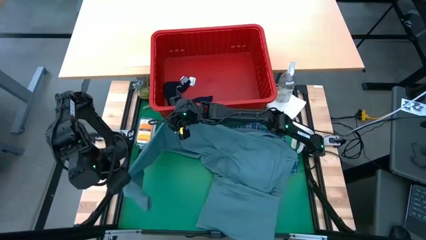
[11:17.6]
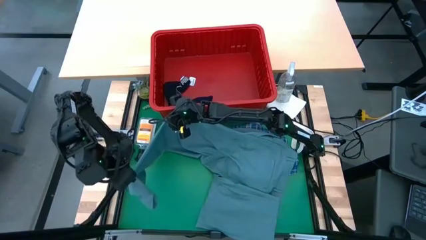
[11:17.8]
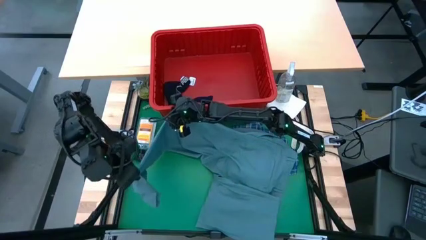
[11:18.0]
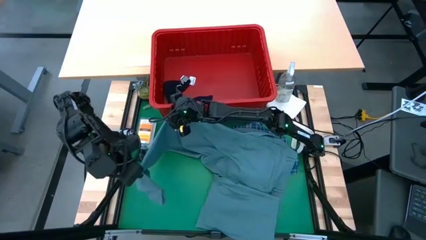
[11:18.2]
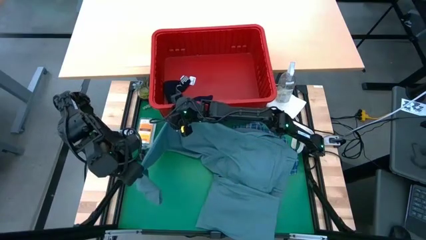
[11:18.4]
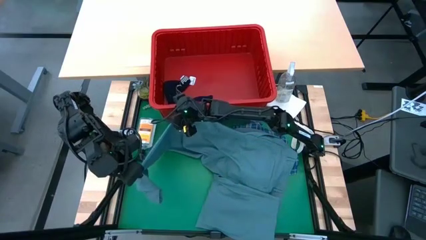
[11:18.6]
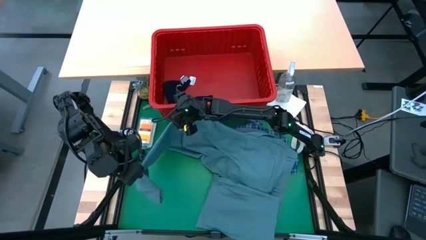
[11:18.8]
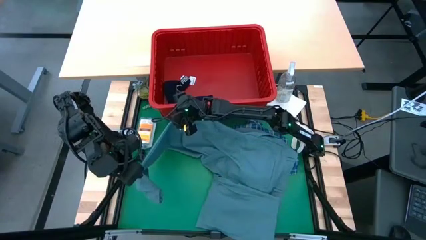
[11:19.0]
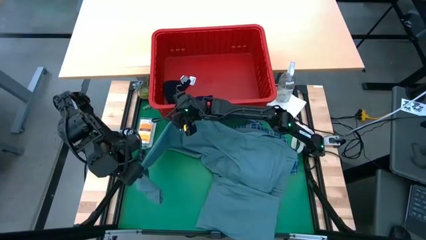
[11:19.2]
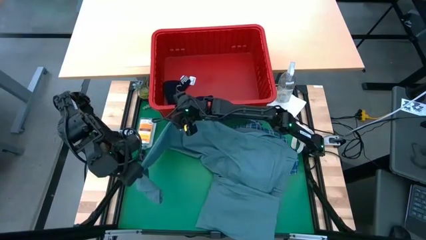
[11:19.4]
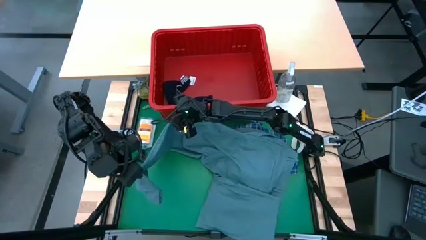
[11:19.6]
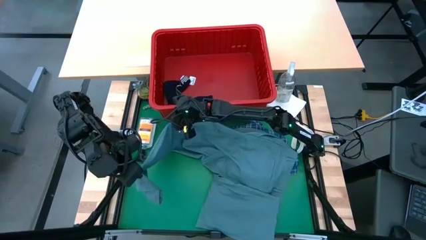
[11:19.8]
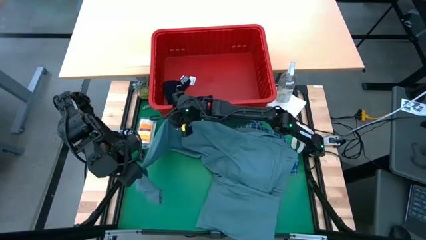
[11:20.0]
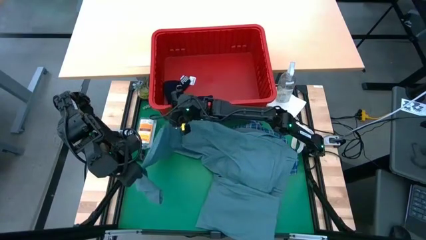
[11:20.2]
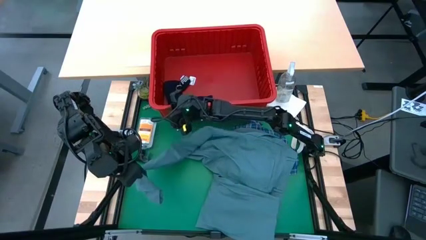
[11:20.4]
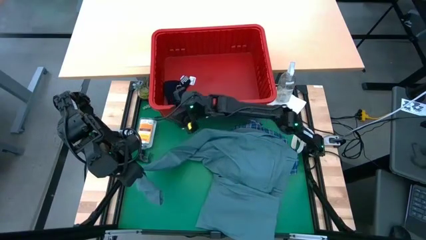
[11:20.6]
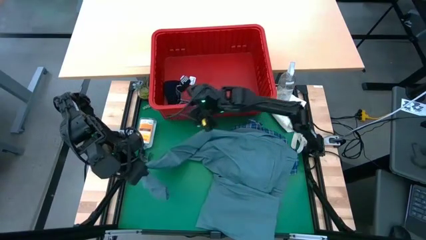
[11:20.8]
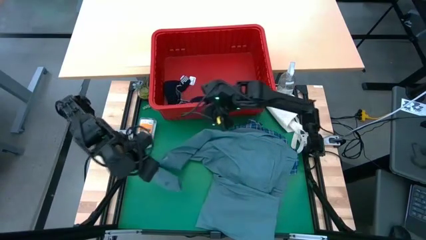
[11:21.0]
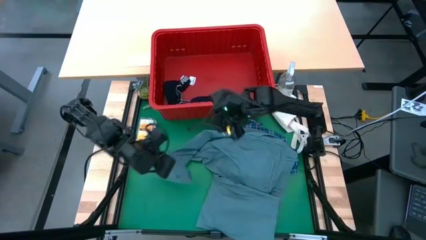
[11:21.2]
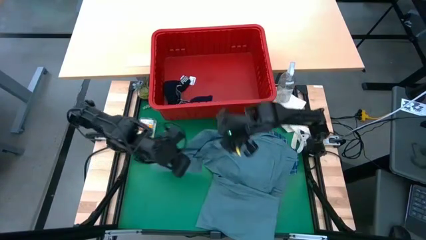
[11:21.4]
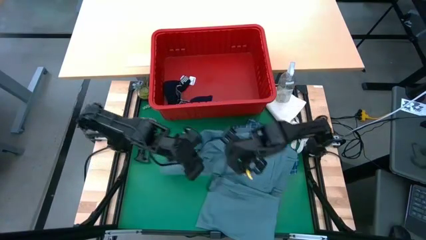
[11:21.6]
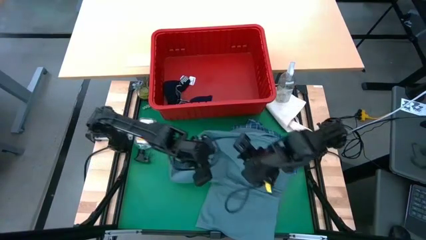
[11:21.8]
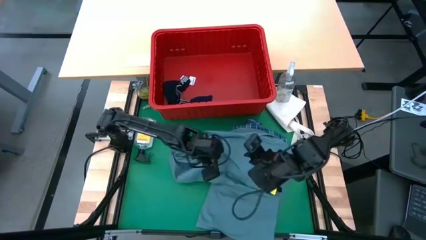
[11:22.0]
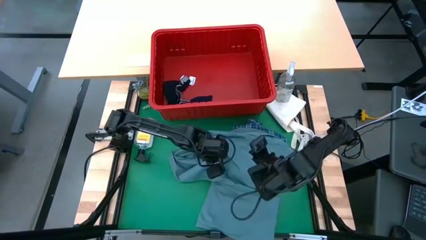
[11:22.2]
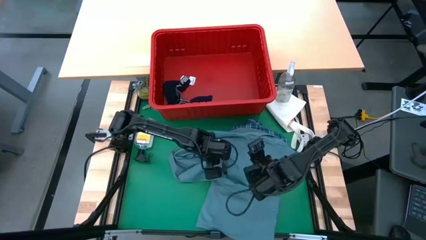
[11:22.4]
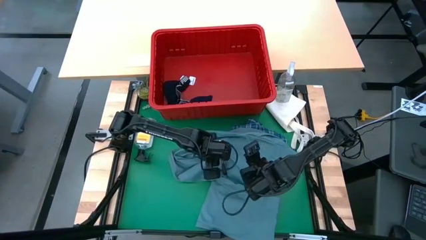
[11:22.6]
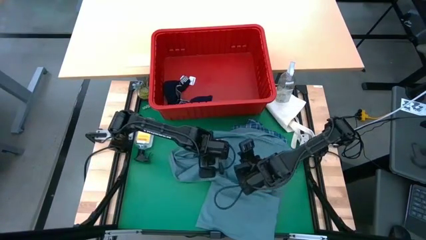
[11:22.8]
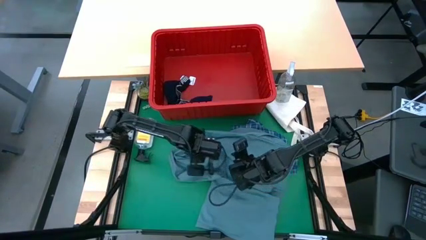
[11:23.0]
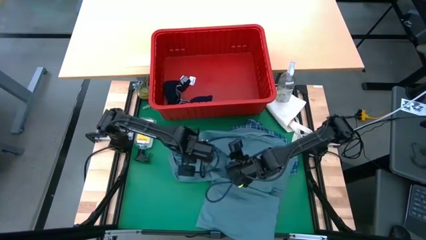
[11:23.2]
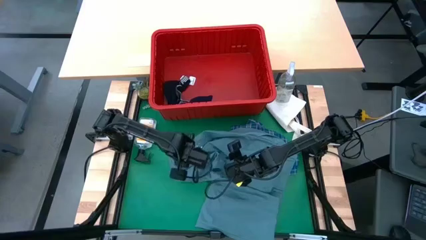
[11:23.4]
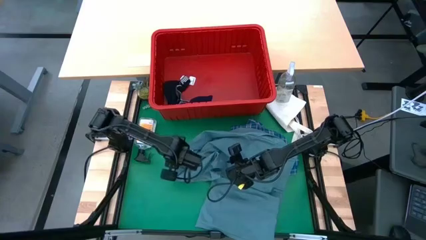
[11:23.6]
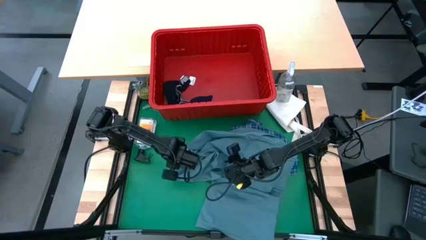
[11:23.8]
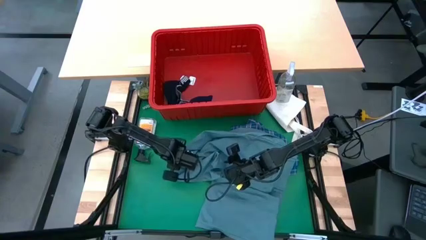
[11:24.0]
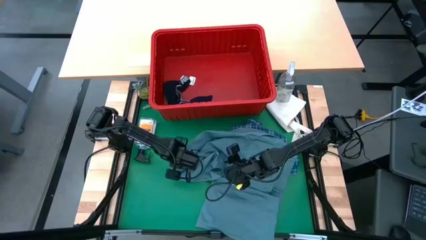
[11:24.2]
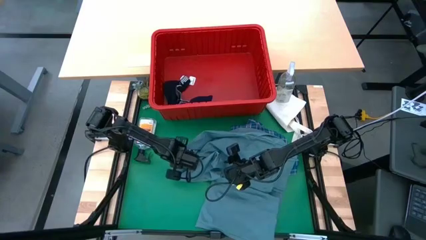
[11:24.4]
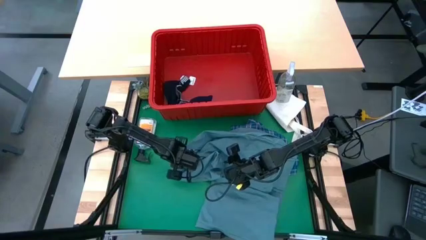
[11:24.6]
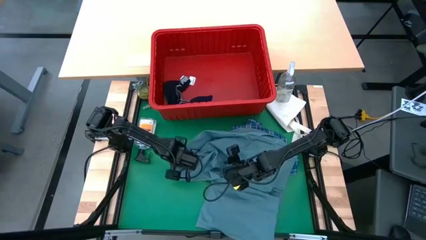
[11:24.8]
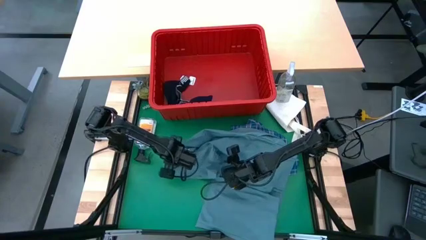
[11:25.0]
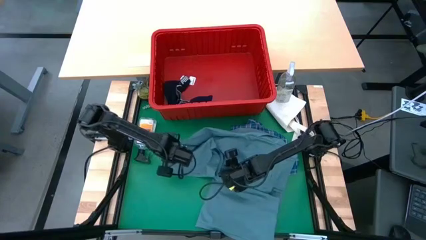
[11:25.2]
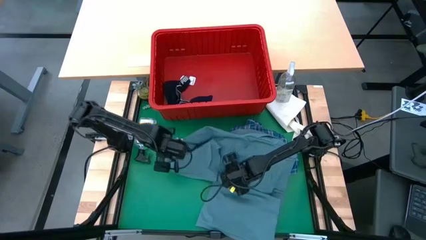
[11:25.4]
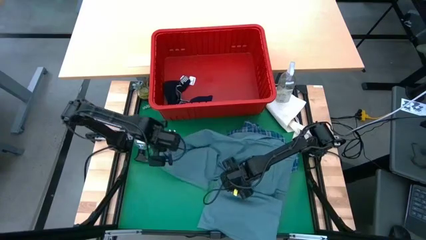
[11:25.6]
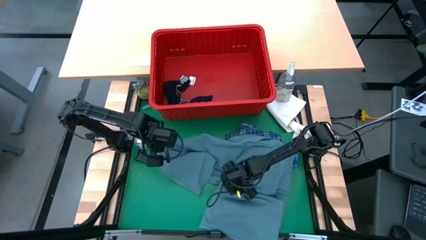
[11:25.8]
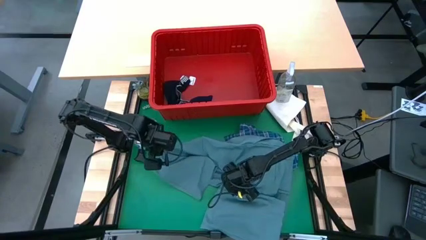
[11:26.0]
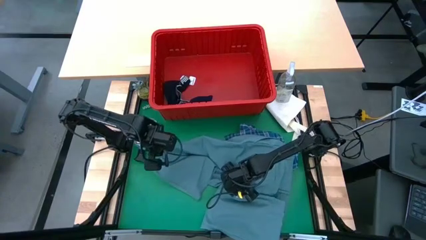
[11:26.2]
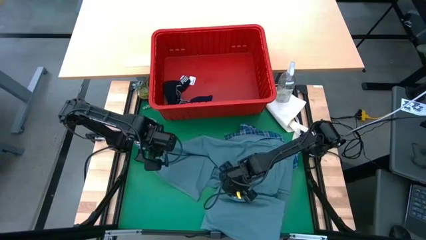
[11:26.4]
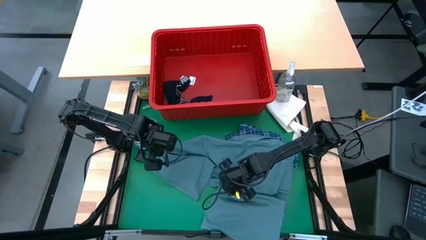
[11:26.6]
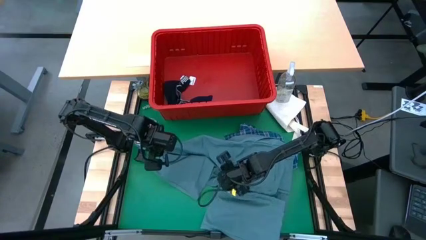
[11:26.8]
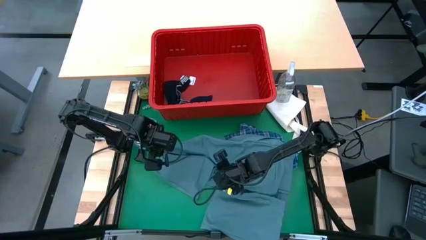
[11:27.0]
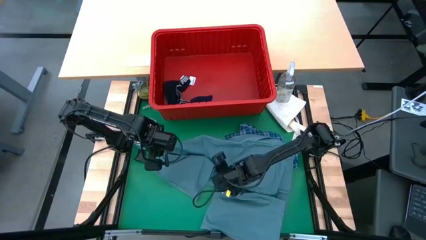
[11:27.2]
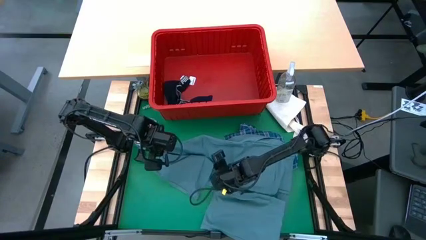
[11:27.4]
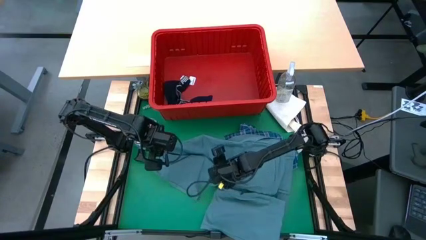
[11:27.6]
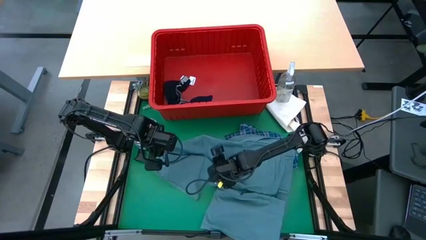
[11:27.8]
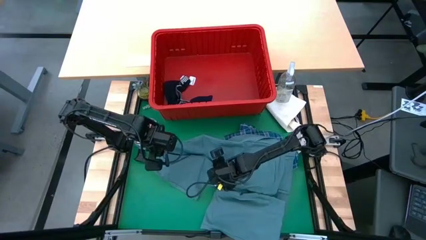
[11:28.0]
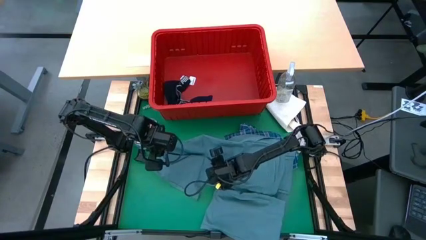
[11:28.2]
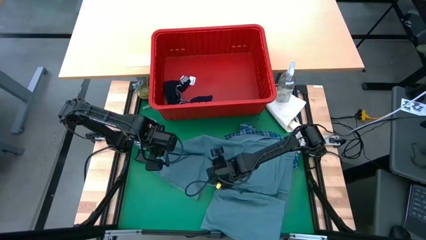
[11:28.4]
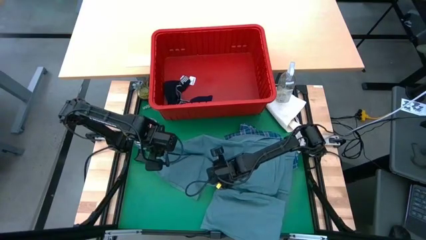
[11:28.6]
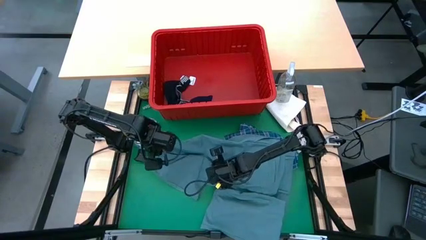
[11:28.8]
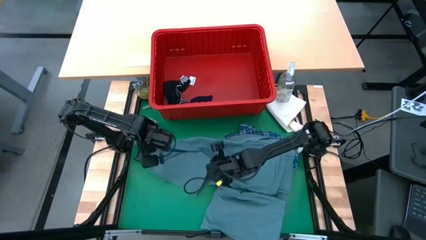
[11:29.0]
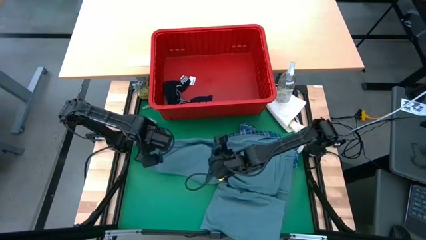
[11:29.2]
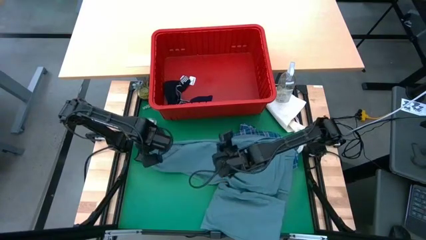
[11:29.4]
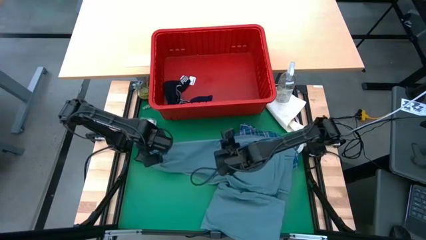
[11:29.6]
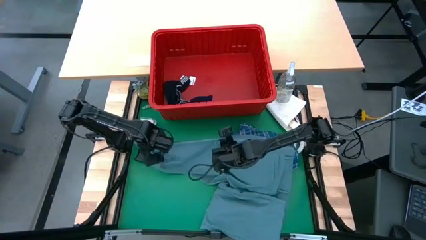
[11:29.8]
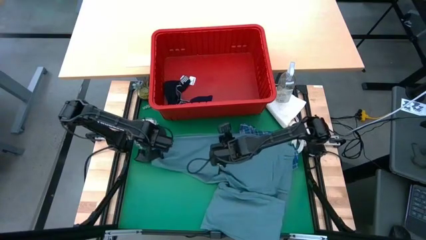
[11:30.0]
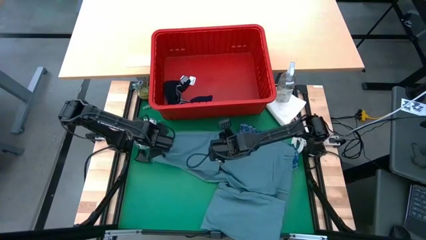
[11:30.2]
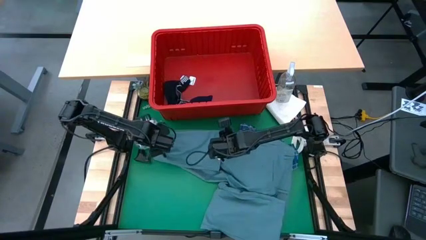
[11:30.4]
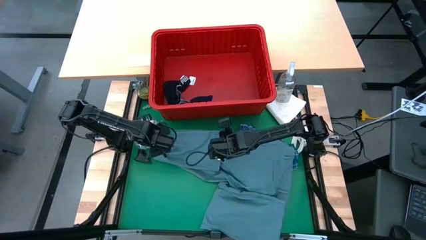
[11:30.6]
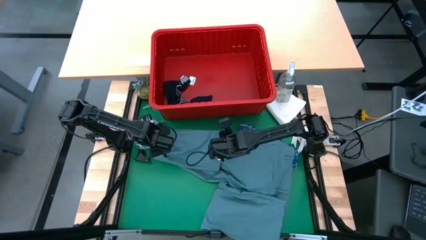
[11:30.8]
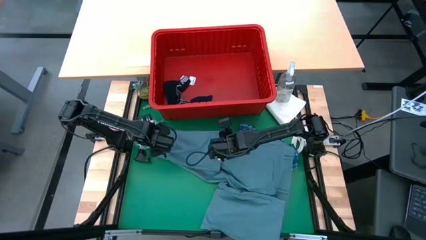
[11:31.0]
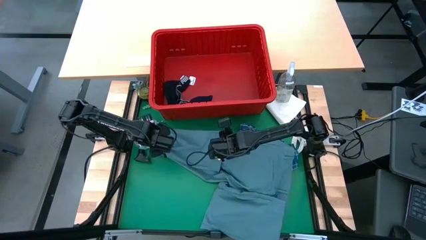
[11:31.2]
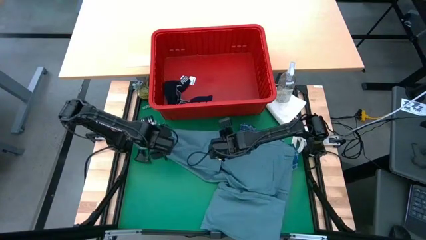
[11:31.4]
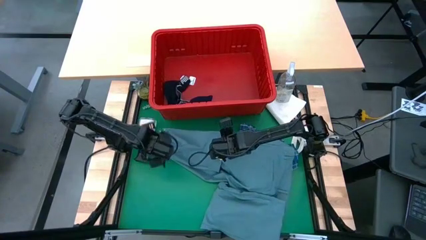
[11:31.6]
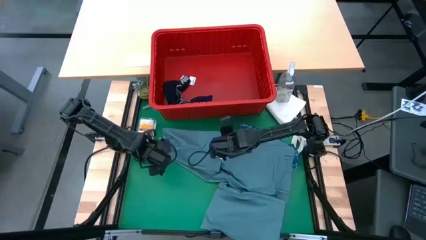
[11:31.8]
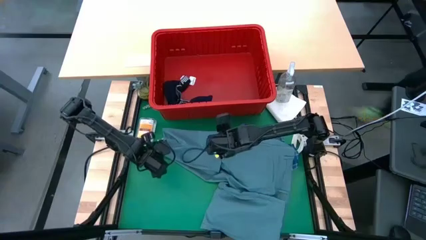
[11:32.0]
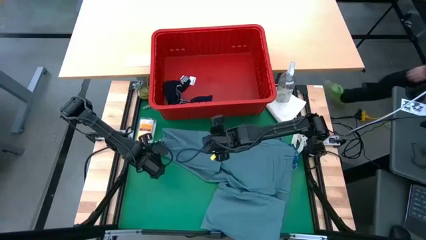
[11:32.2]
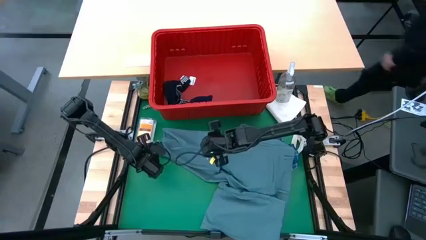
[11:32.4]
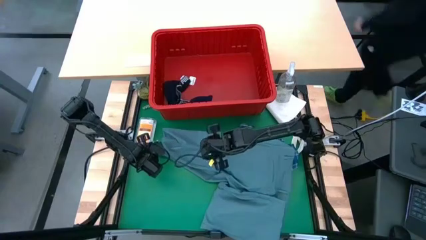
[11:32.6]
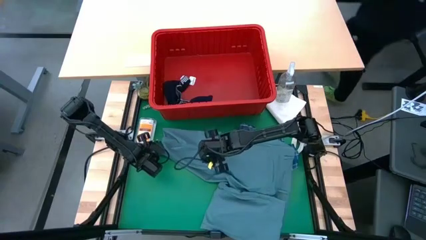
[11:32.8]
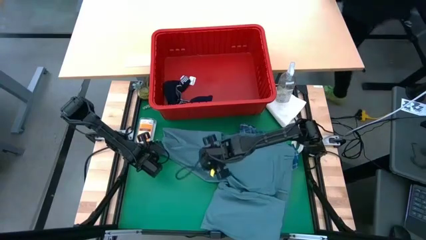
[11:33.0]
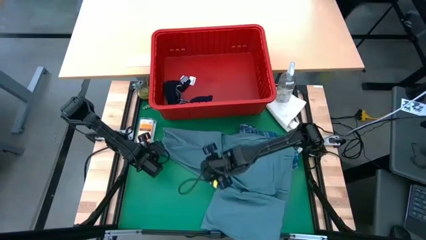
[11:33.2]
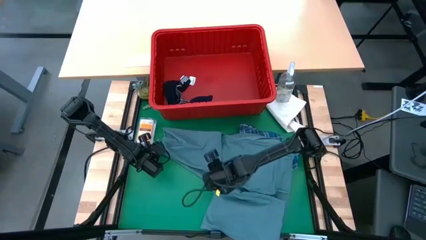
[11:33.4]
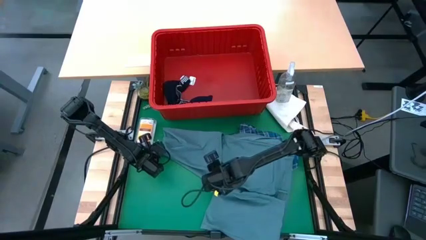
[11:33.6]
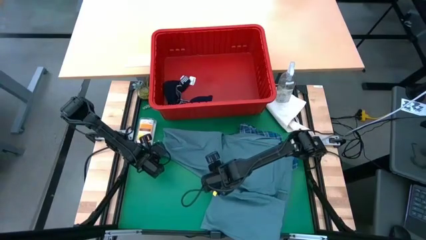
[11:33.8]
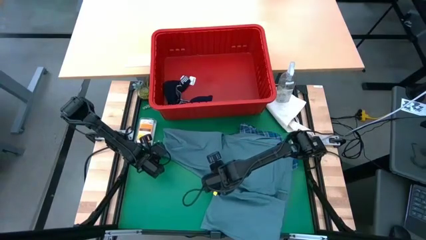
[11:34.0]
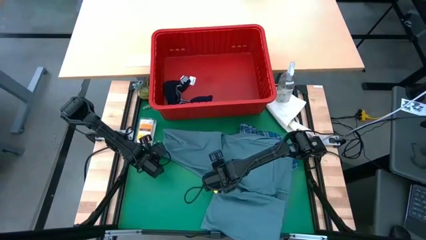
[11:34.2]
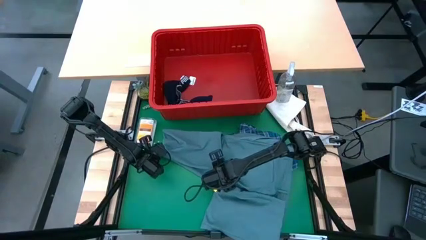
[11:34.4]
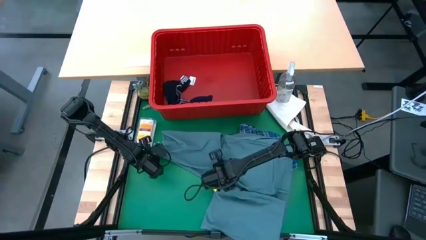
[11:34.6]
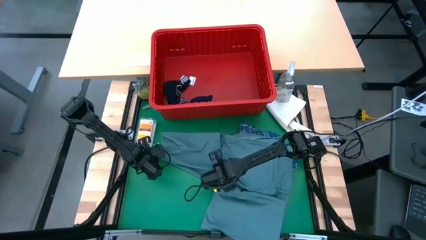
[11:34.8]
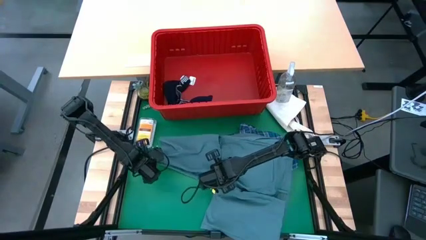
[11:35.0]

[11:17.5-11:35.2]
Task: Fold Laundry from Bin
Fold the blue pants on top of the blue shirt
